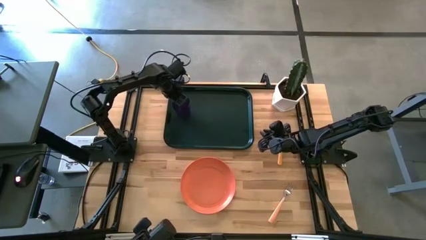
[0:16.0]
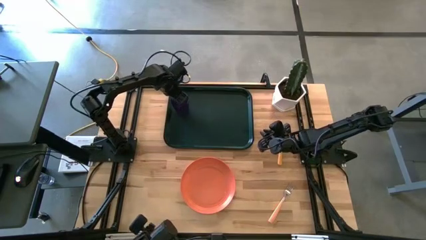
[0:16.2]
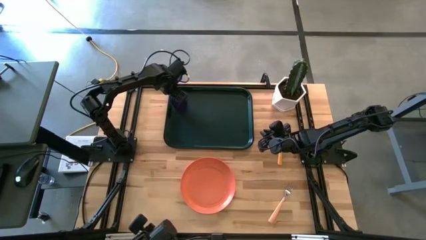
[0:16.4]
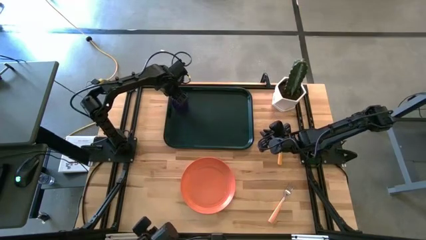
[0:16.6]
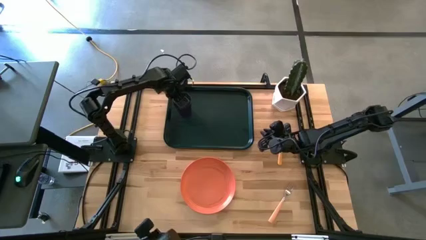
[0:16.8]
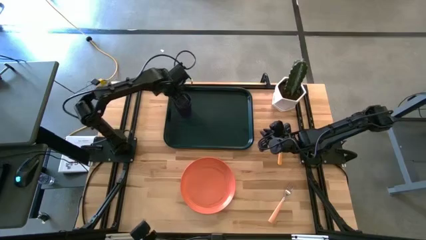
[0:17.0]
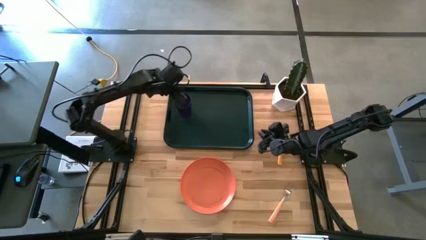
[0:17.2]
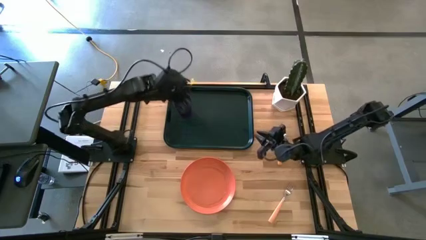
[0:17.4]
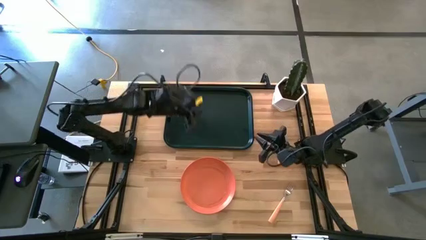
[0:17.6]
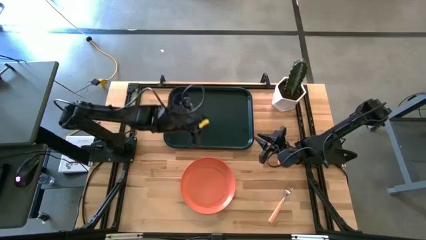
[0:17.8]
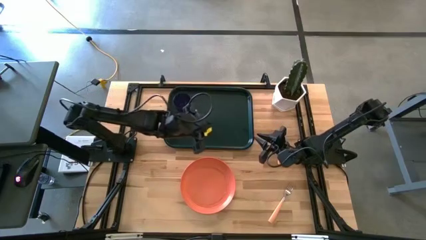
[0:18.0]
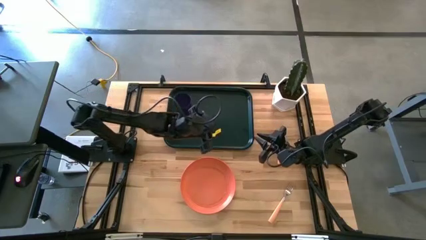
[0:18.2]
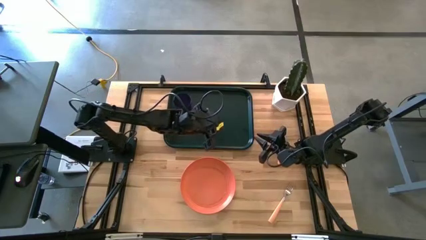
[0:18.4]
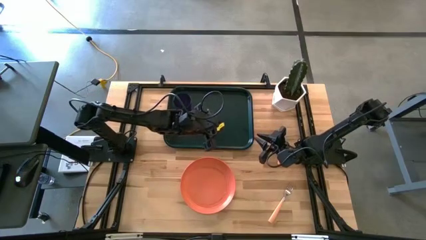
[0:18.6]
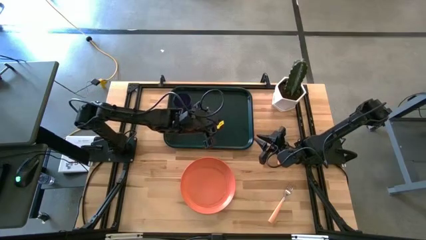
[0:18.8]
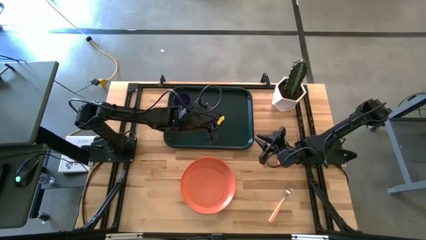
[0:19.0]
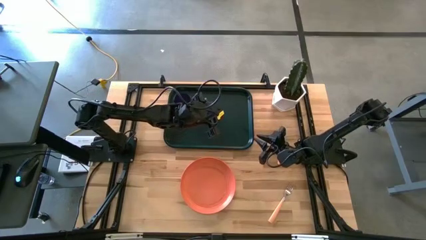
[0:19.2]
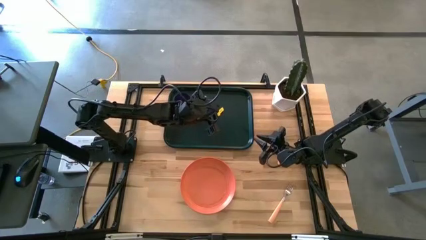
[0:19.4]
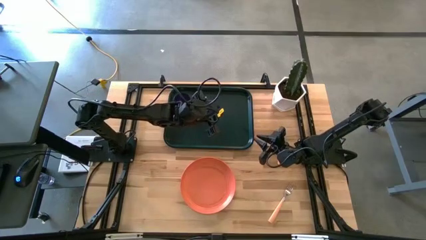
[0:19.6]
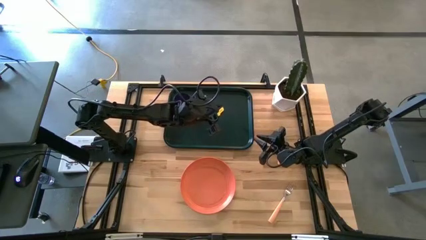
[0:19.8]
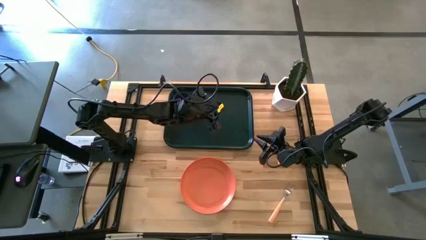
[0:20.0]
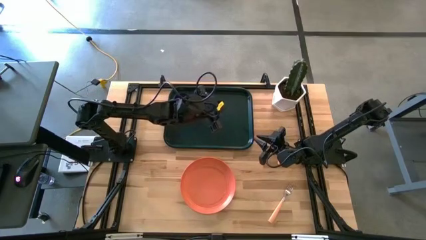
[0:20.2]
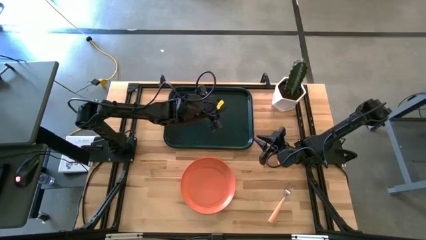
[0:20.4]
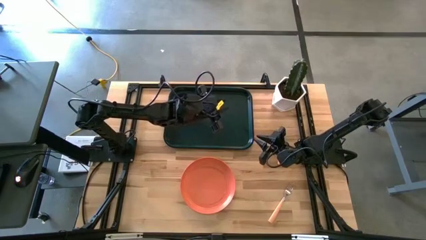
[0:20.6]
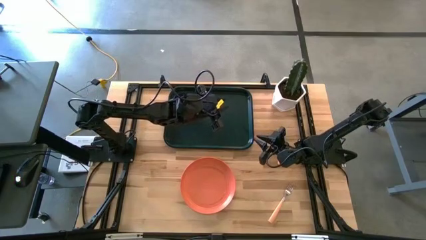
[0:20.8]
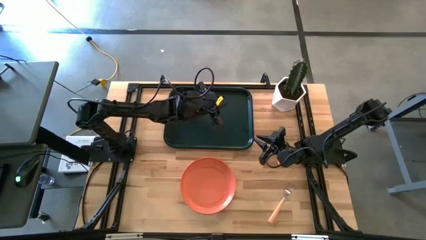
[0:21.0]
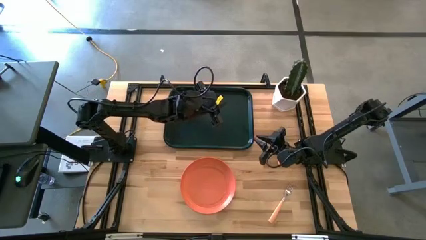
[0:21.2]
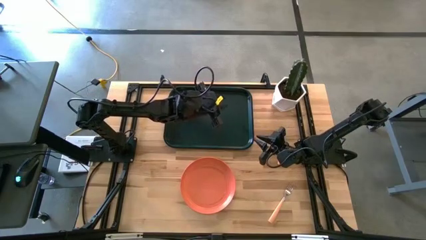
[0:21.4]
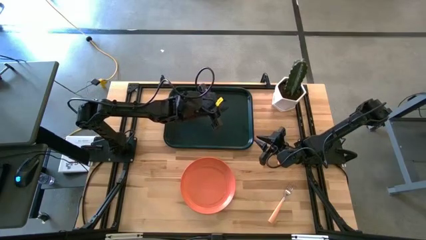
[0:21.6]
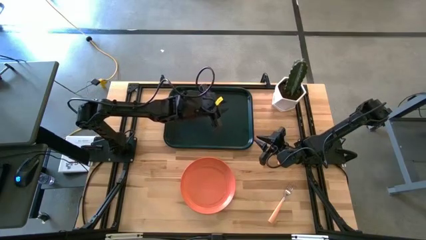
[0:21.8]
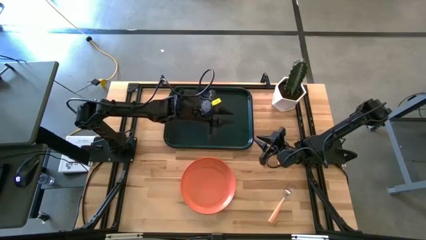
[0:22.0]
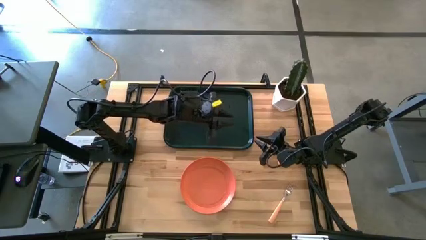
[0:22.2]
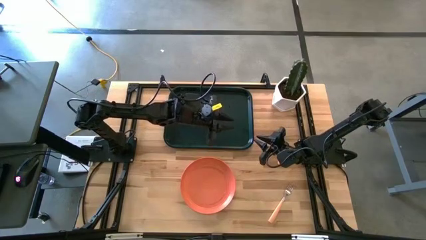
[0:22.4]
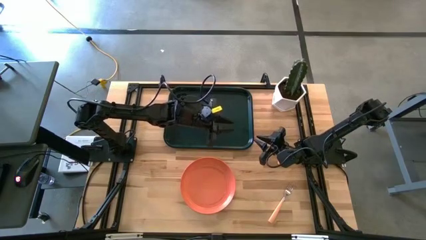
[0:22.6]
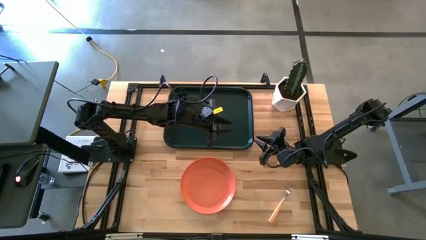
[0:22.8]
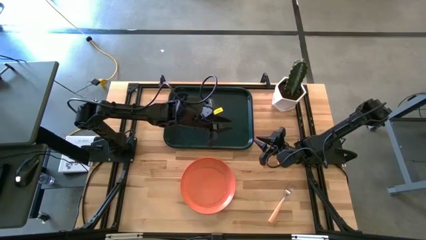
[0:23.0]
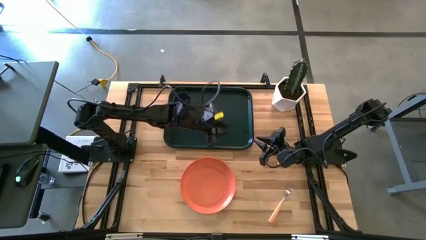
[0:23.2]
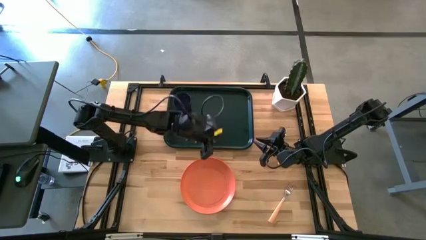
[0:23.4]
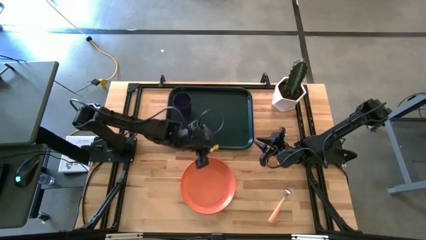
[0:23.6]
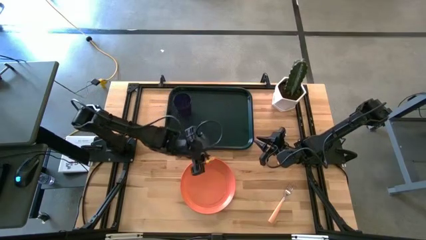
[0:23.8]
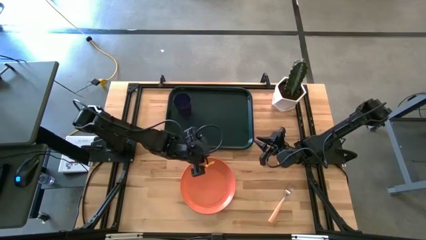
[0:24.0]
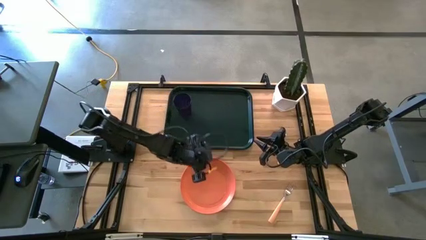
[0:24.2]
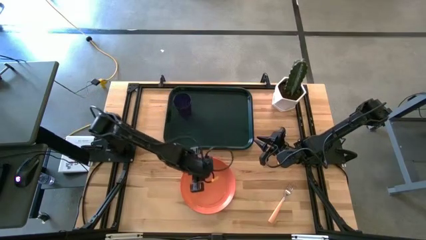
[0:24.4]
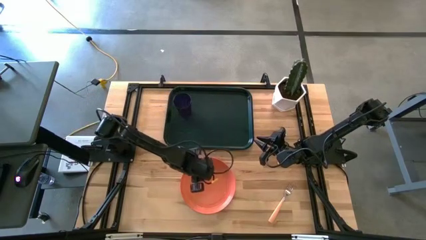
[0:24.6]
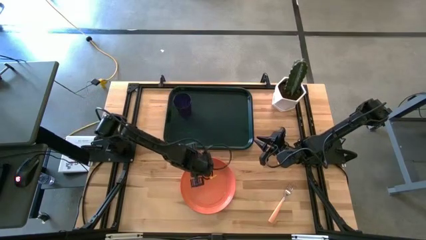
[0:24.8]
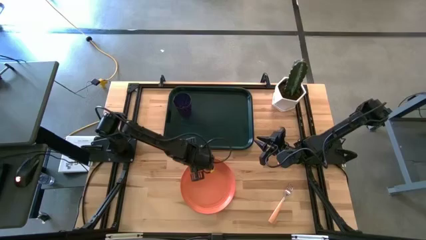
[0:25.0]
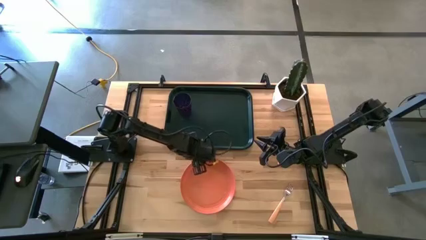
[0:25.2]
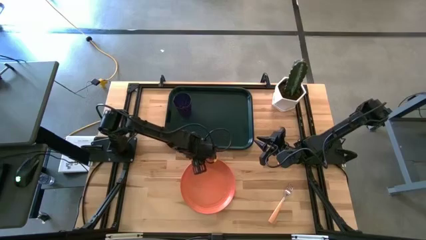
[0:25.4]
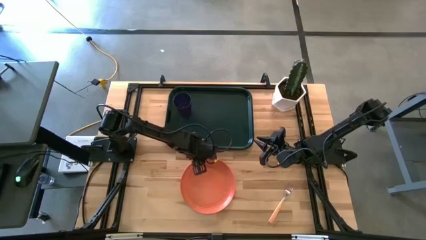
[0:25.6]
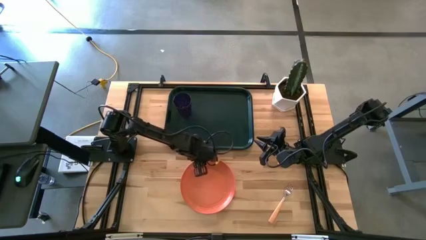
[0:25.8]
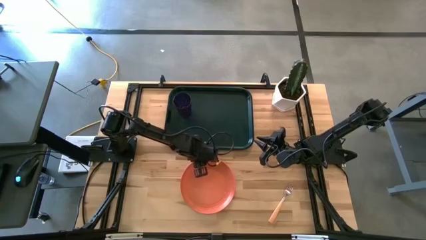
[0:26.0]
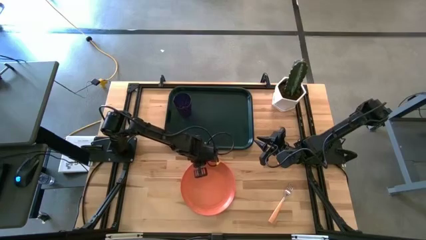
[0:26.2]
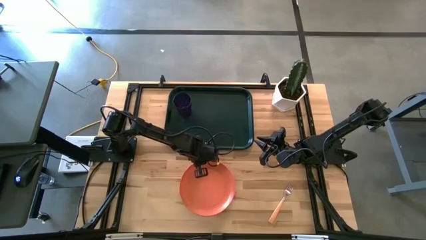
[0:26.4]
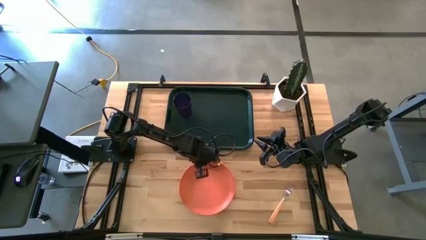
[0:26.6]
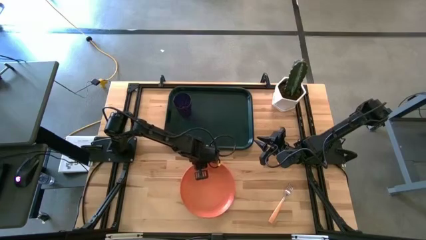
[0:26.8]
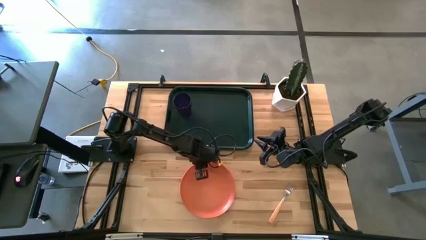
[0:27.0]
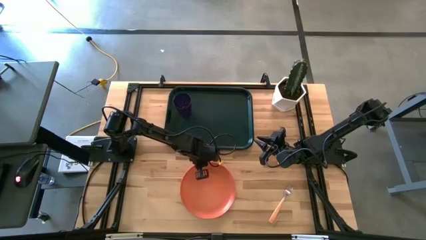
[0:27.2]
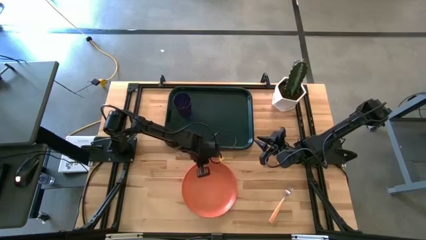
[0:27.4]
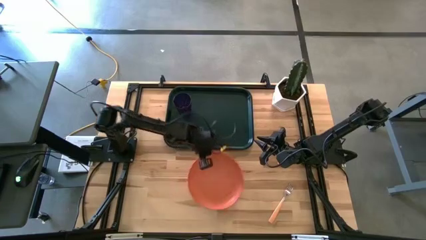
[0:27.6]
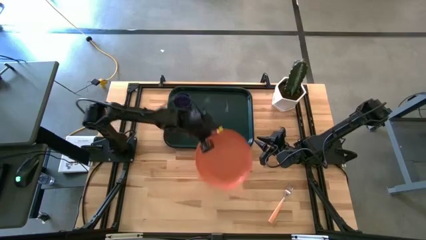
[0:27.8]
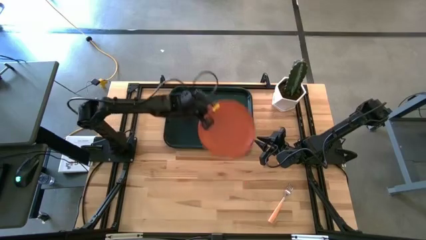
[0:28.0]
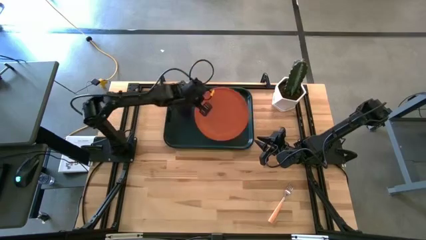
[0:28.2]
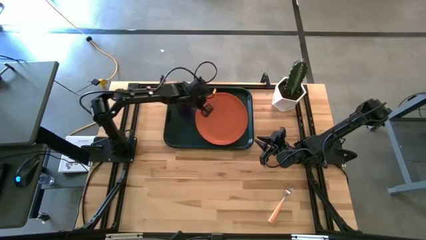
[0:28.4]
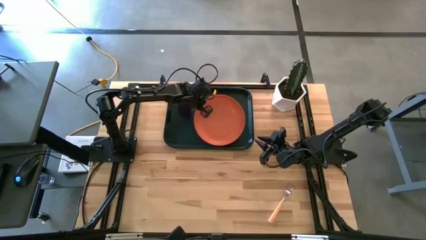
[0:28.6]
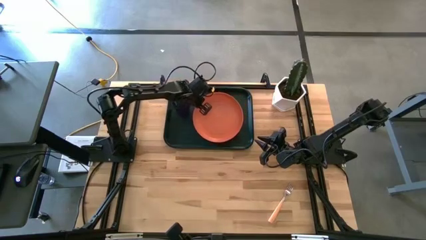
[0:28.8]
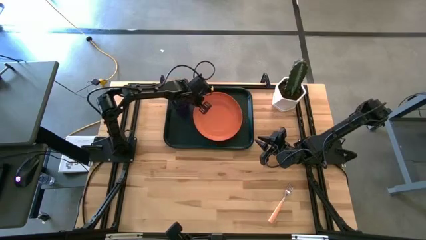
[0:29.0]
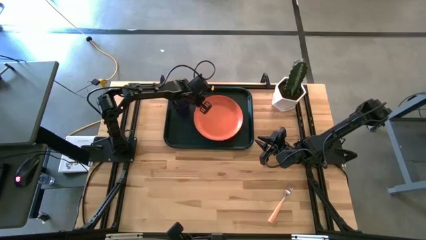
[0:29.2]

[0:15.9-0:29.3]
Task: Pick and place plate/cup/fork/spoon on tray
Put the orange plate into the serving tray

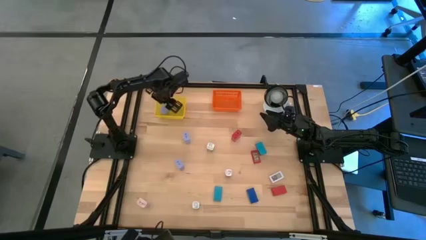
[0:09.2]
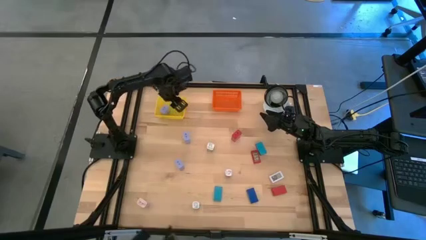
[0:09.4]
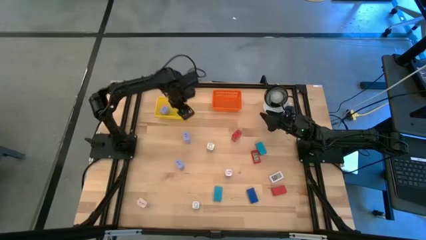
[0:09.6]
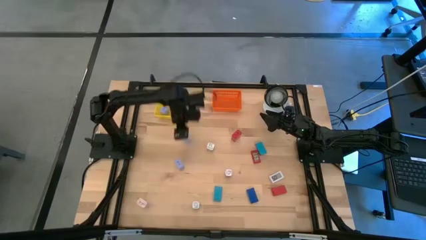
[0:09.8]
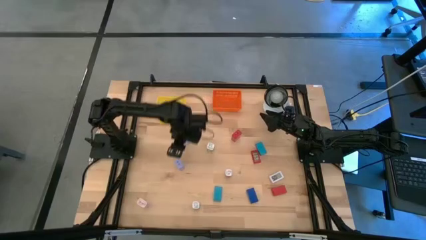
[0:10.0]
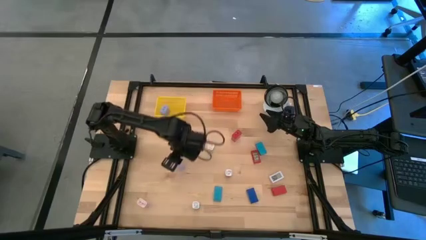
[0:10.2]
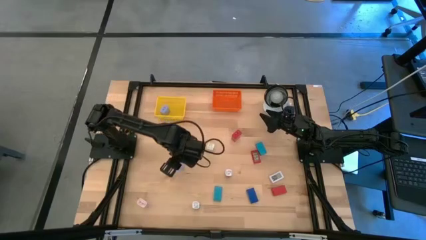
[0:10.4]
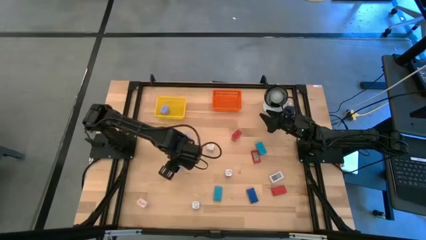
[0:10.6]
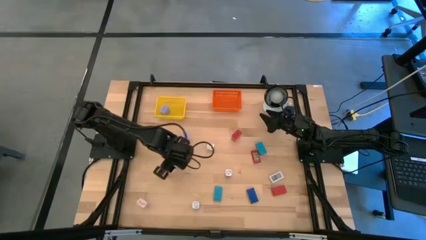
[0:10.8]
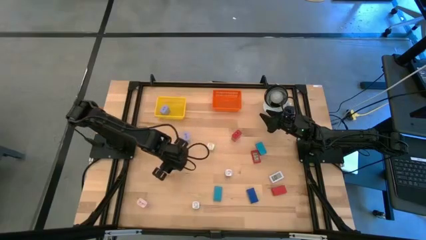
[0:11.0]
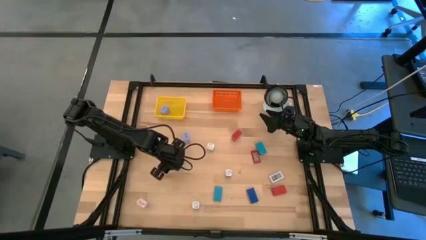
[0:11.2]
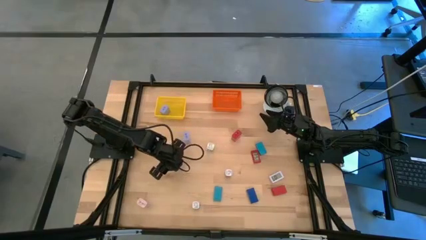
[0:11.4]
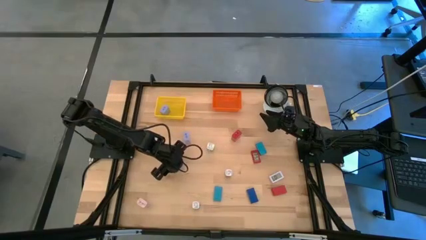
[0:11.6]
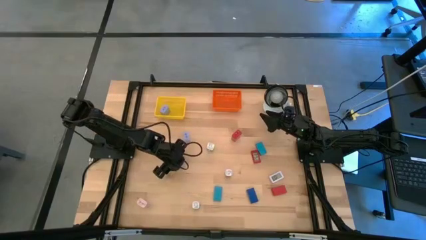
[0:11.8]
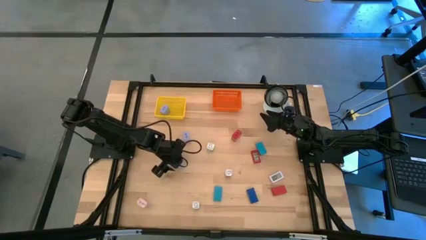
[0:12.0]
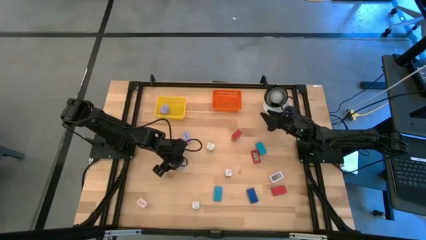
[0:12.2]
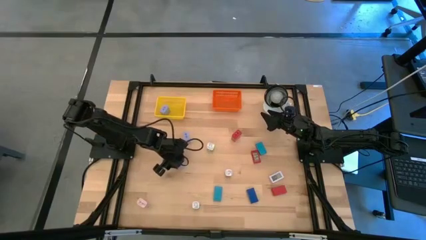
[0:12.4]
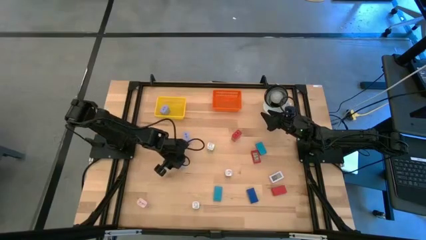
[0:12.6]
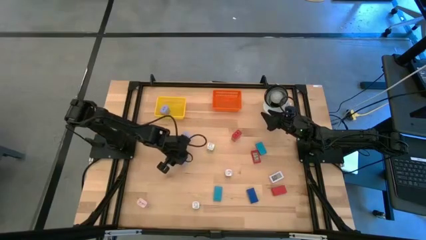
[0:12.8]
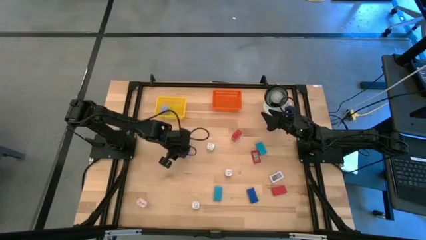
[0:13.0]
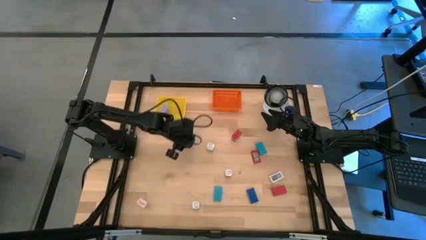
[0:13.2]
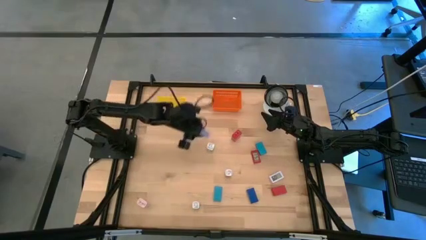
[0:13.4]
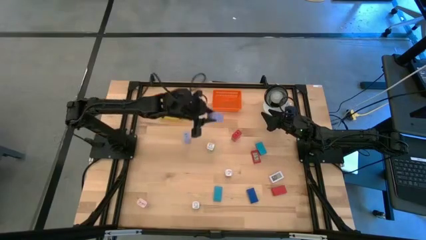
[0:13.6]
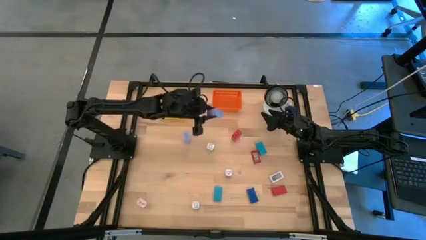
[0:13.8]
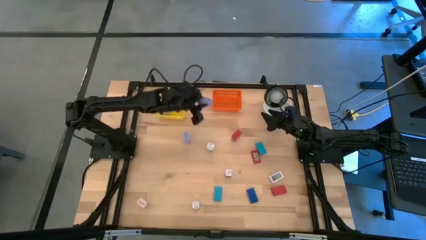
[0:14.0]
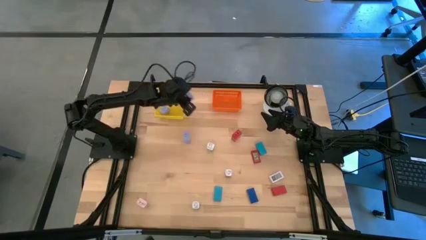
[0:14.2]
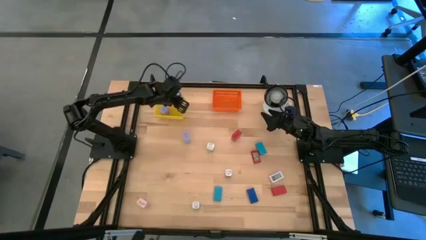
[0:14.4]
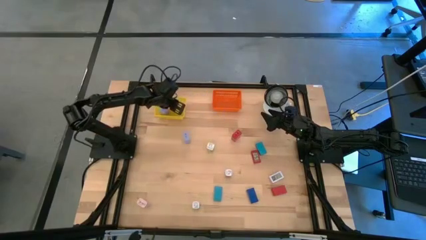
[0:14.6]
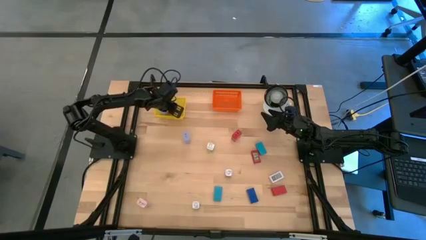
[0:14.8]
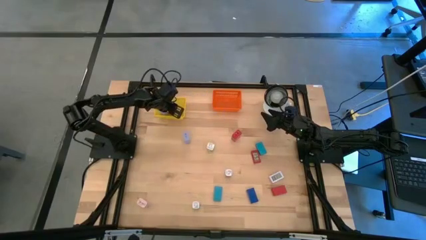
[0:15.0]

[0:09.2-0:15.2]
Task: Pick & Place Office items
Put the bottom light blue changer adapter into the yellow bin
